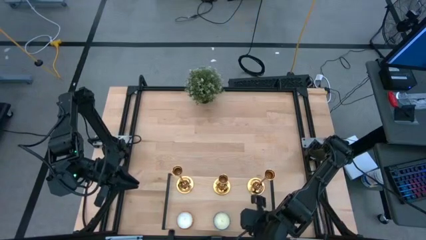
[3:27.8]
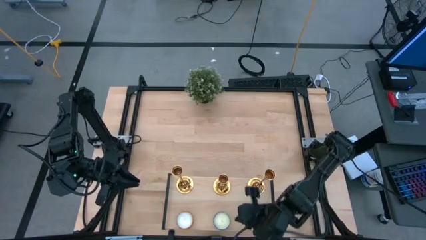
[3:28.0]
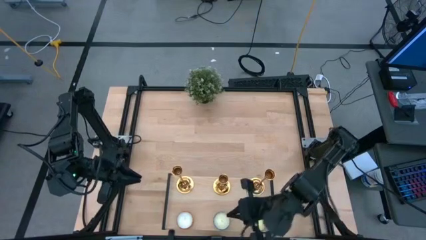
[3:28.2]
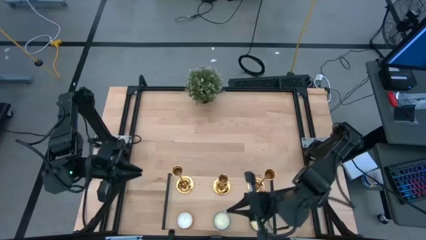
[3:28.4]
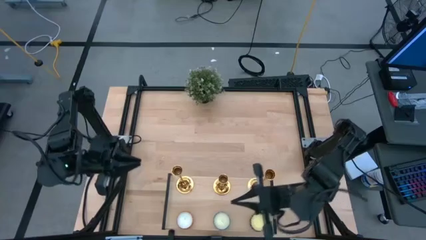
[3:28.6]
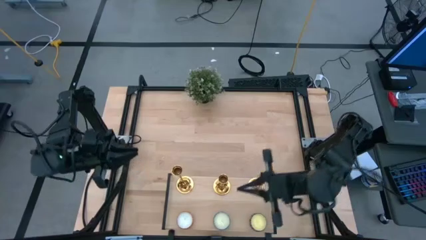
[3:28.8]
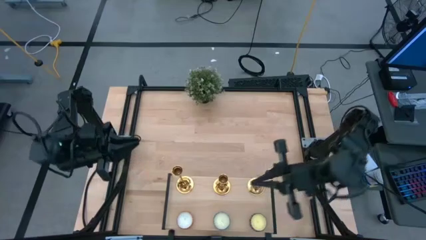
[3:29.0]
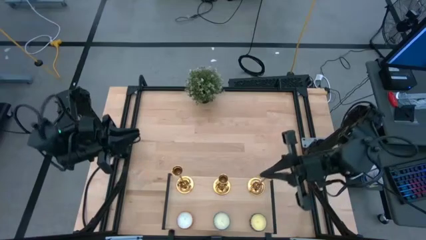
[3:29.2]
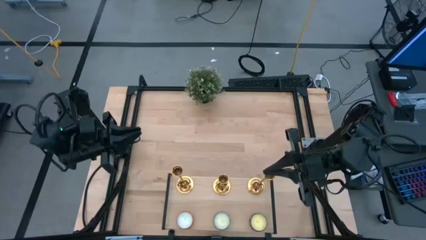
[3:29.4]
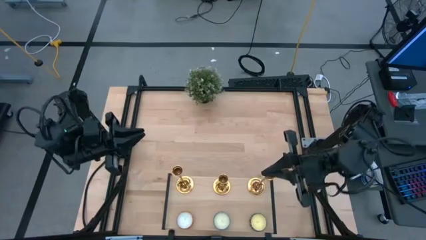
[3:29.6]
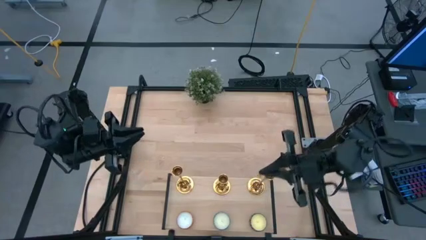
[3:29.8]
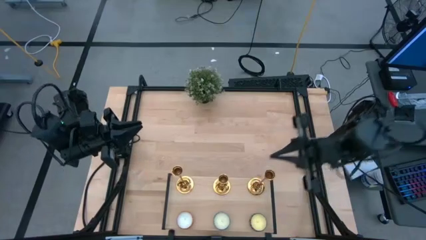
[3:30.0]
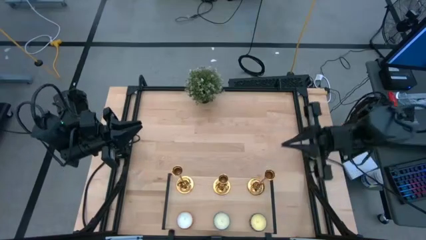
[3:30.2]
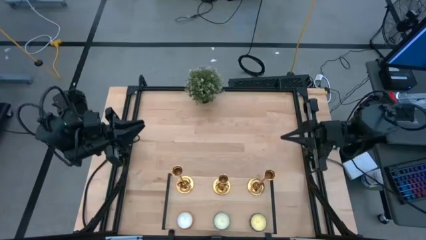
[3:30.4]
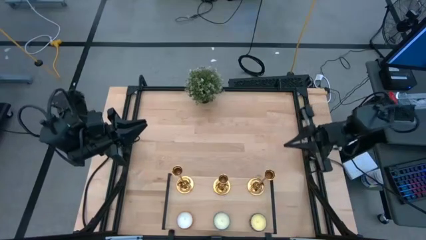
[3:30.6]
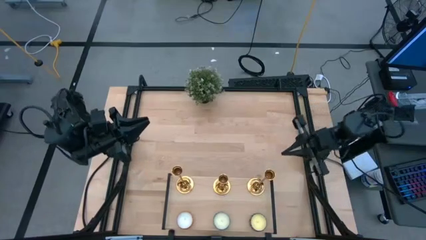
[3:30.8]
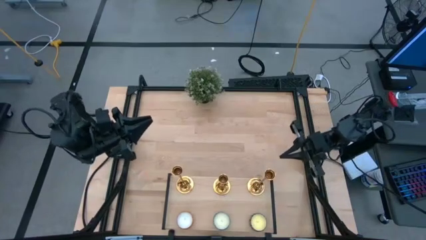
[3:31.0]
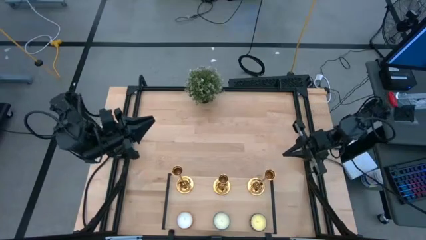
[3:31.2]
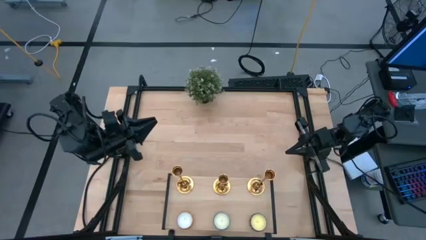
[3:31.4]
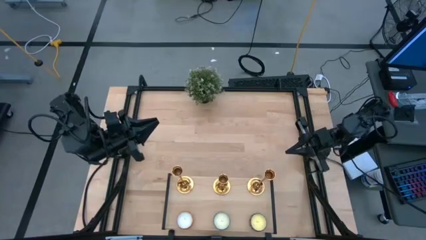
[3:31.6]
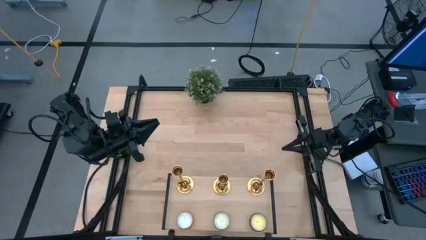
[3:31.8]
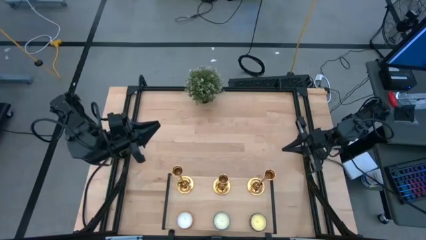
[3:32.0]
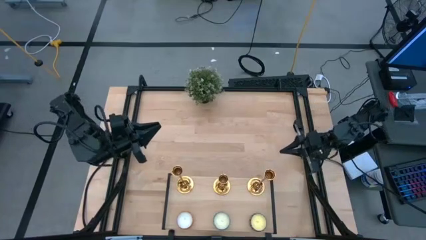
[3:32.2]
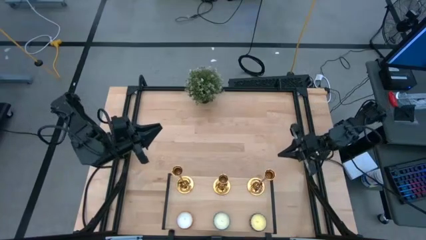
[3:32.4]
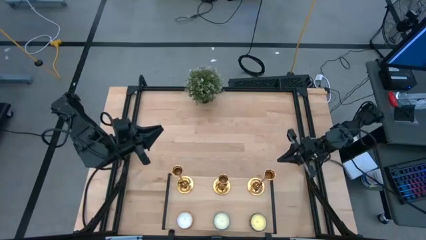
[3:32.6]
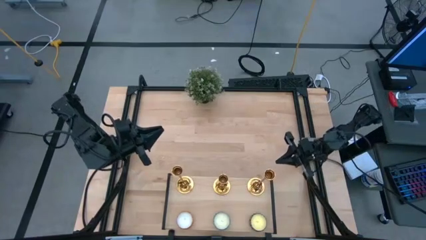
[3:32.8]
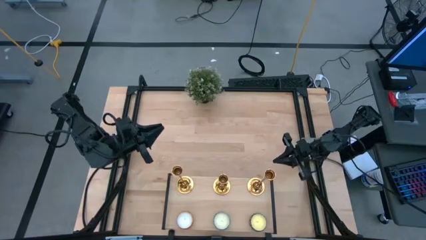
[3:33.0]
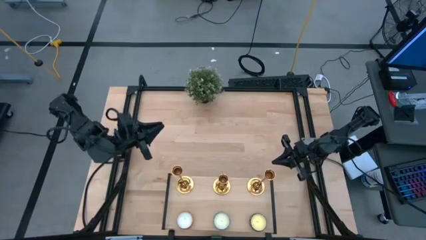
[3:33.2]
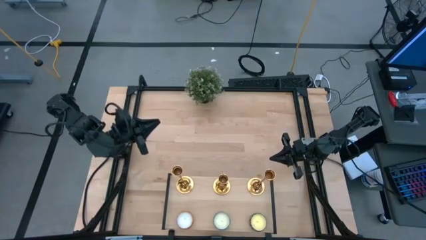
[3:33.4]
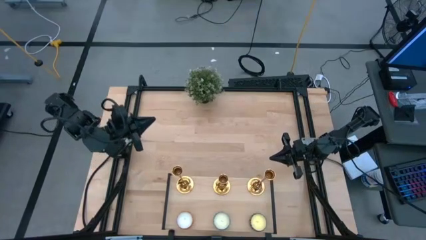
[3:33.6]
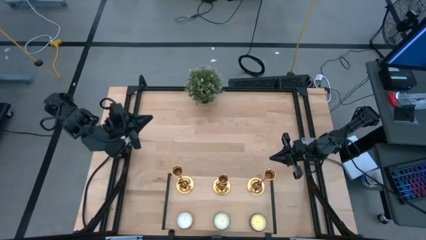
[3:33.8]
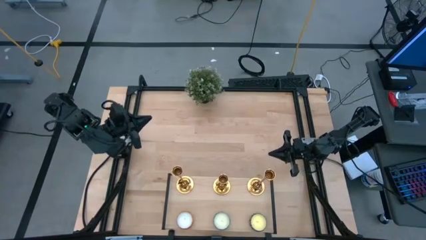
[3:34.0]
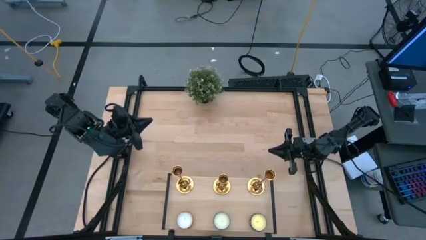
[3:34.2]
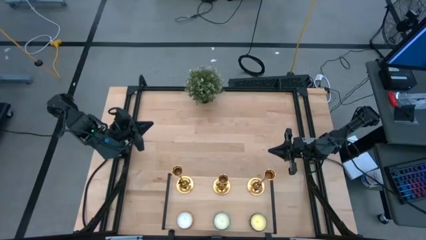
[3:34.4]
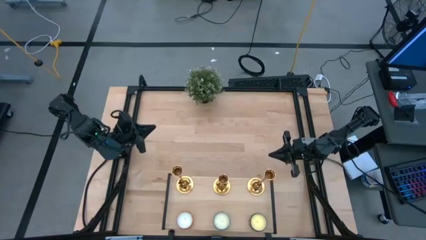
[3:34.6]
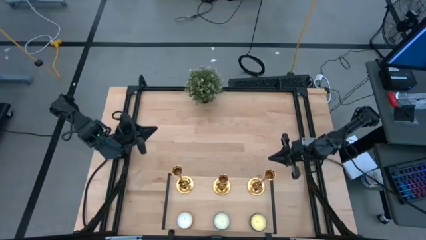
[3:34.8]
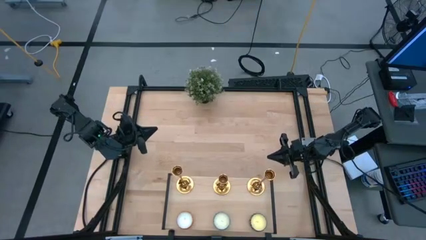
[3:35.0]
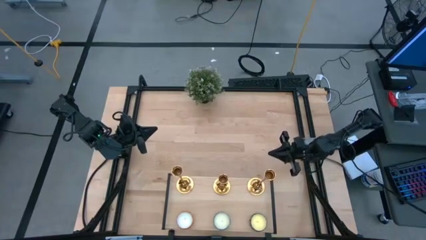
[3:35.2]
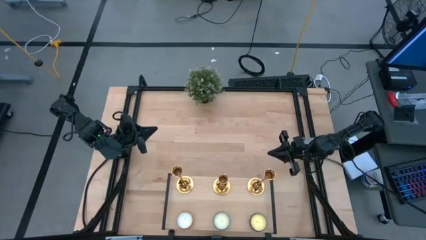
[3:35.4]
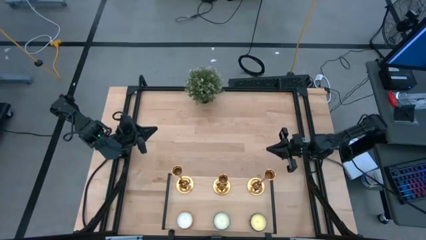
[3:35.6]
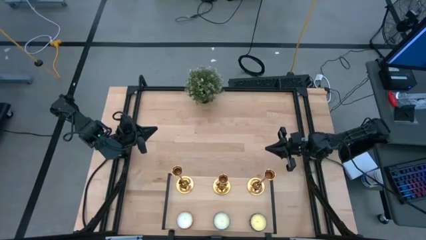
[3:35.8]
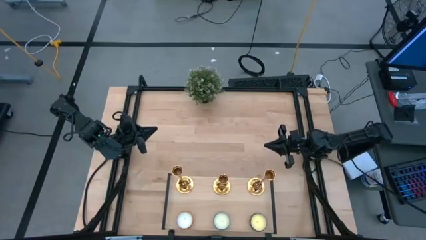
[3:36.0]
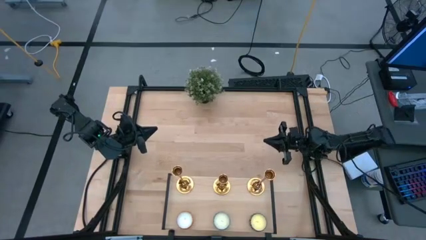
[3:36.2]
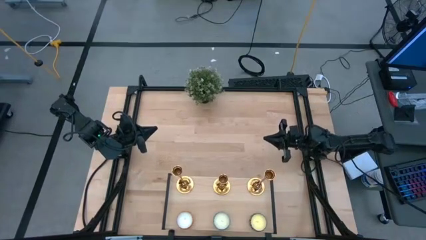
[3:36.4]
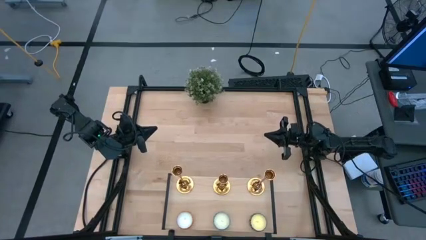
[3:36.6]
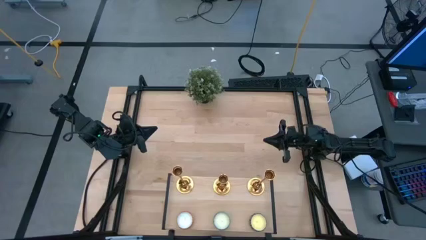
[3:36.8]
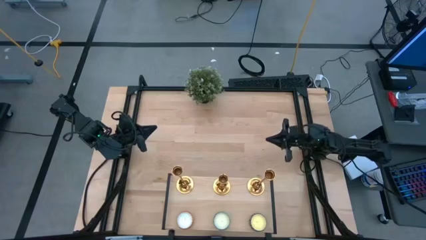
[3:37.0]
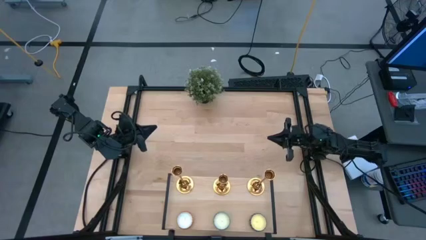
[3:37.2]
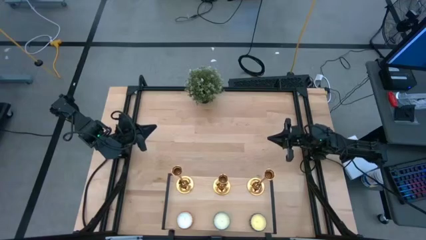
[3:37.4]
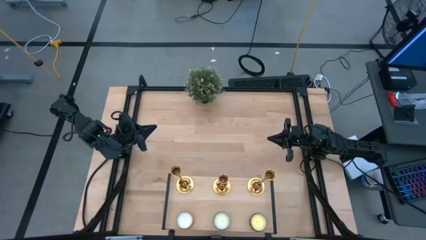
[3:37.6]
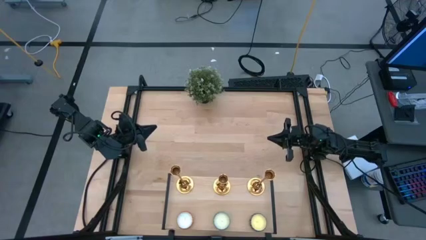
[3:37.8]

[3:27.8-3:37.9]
Task: Pick & Place candle stick holders
Return to Home Position

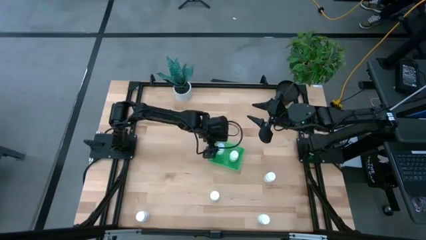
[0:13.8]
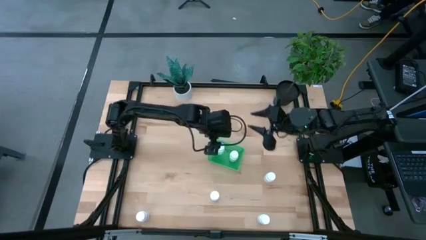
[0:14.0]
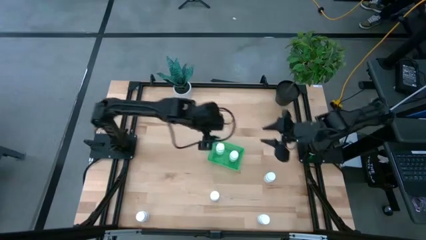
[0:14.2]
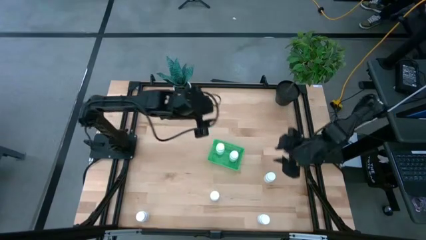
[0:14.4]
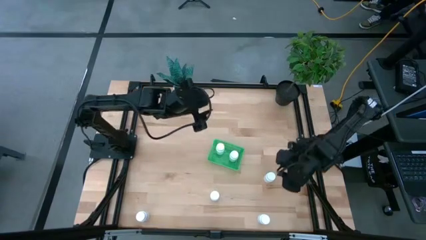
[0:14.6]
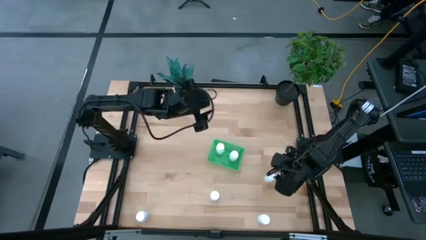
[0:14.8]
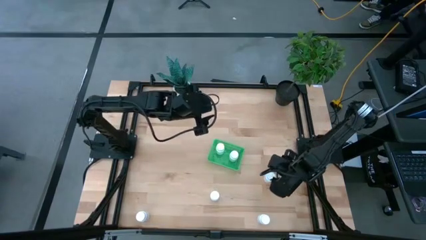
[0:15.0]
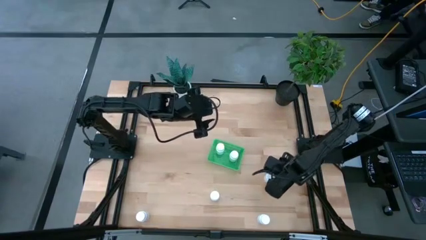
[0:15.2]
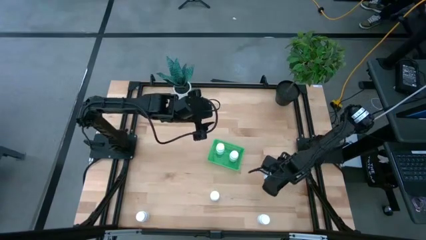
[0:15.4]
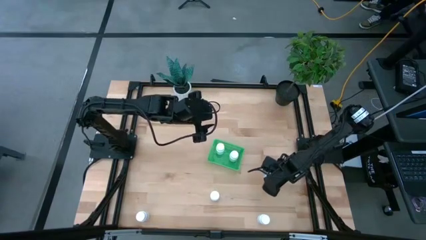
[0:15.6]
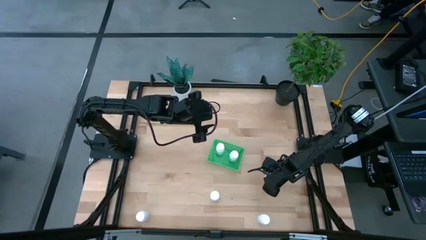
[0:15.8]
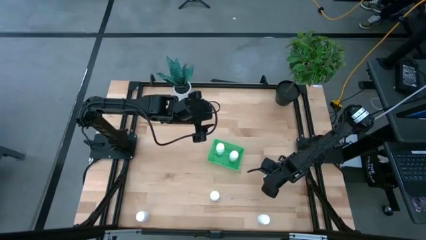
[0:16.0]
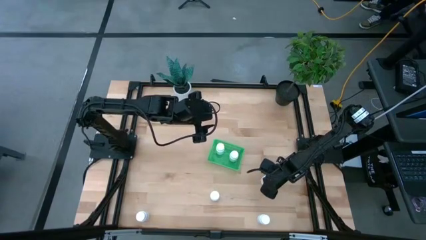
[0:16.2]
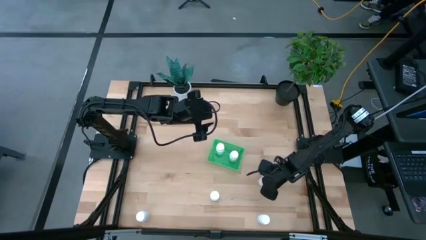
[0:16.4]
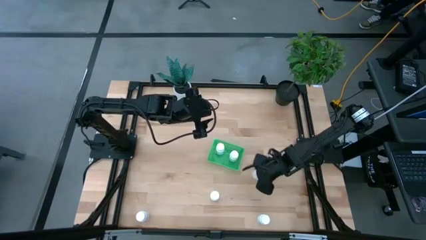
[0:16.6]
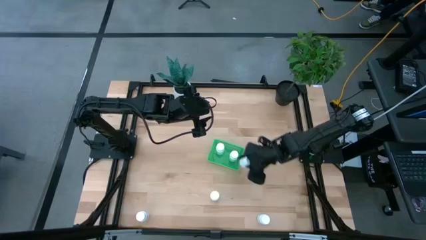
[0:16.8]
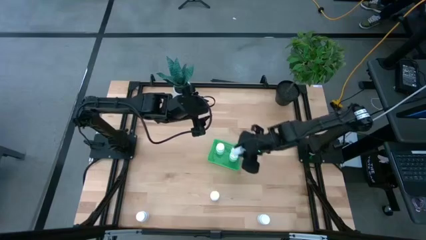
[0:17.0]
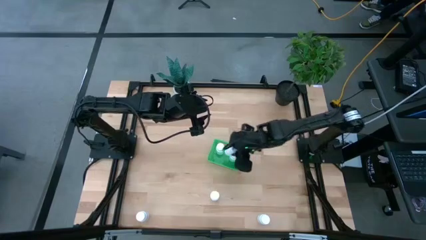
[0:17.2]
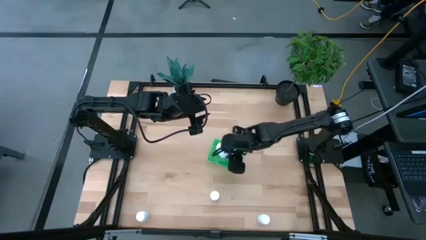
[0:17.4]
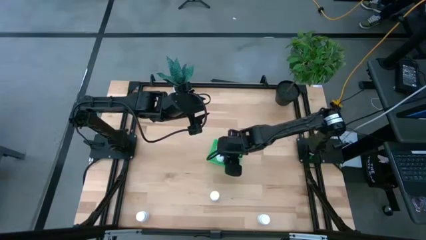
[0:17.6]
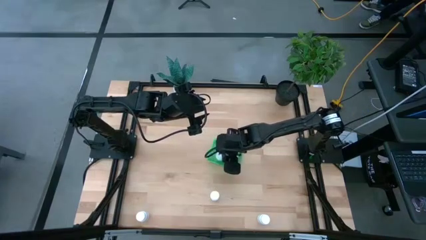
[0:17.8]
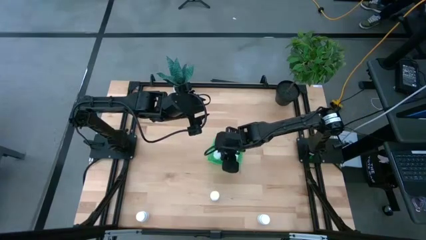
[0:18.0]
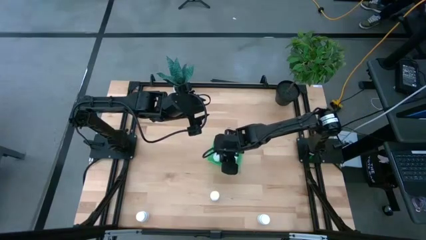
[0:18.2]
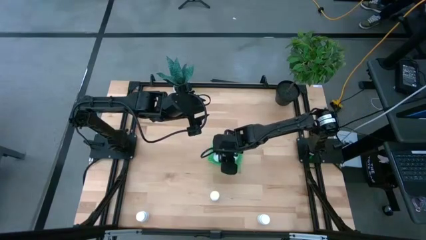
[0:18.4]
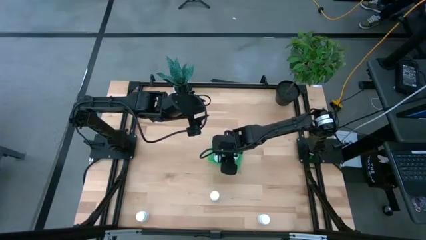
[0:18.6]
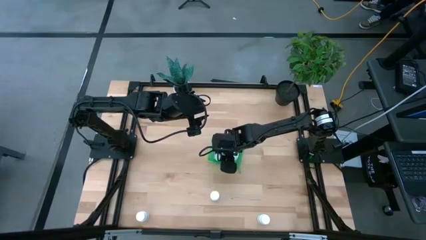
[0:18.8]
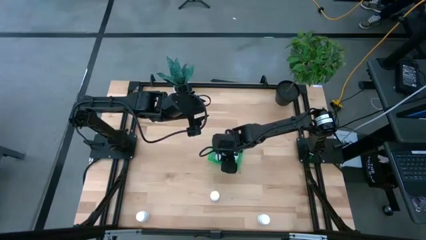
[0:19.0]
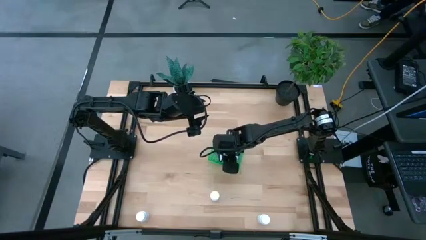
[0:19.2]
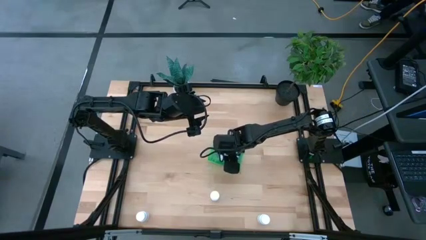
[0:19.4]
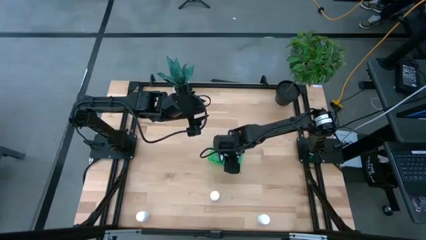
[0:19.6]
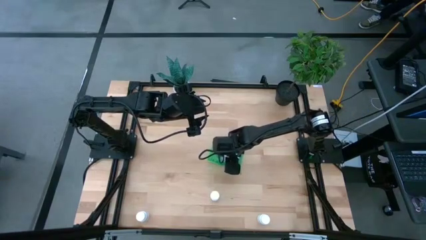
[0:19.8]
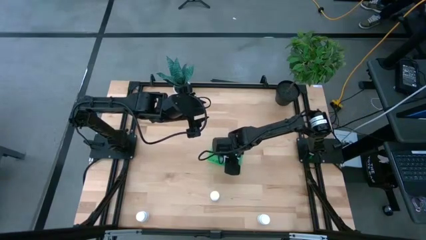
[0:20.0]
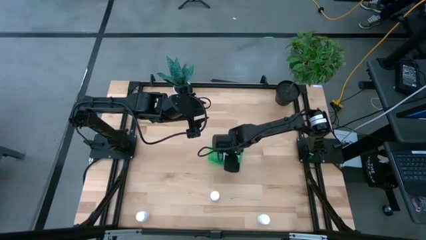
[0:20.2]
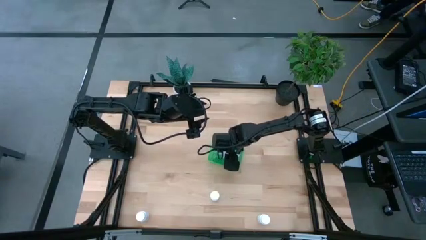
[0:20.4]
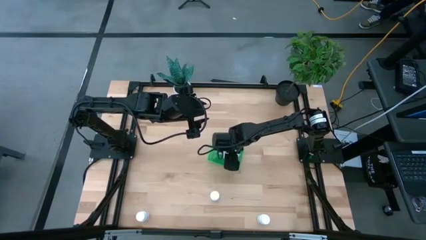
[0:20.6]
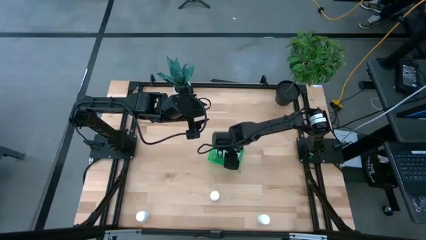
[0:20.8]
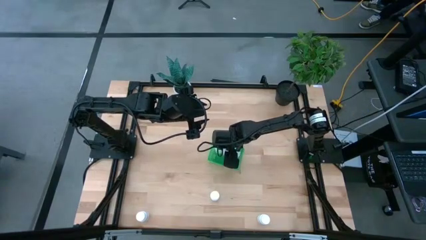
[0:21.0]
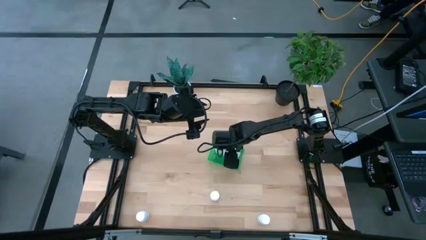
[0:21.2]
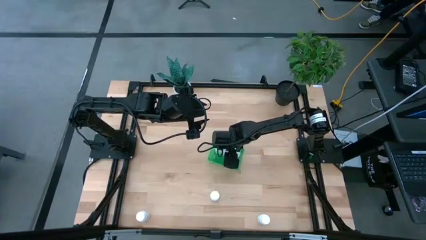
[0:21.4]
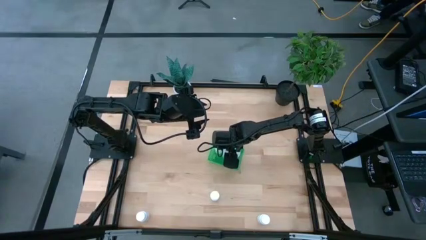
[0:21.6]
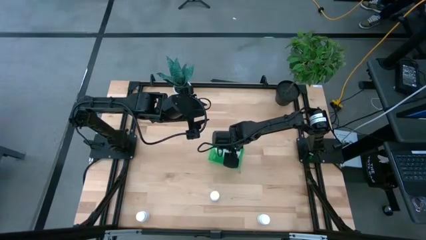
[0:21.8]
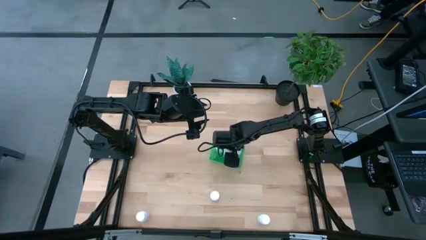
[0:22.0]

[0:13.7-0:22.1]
Task: Pick and place pill bottles into a basket
Put the white pill bottle into the green bin
